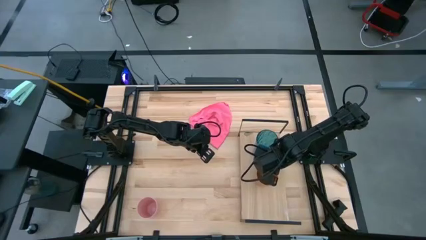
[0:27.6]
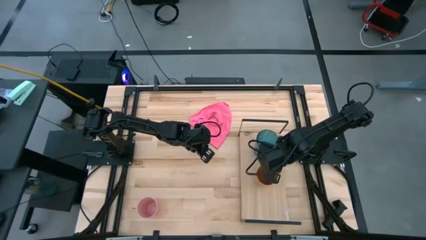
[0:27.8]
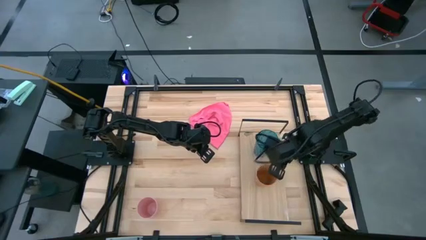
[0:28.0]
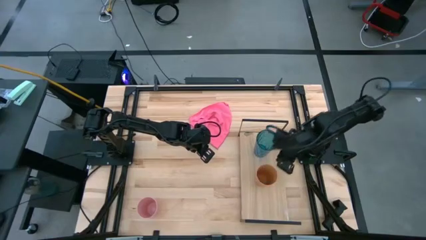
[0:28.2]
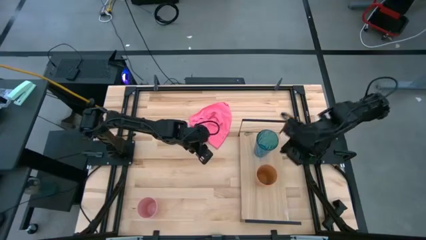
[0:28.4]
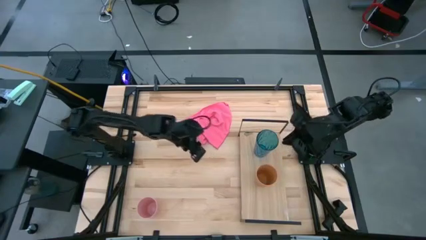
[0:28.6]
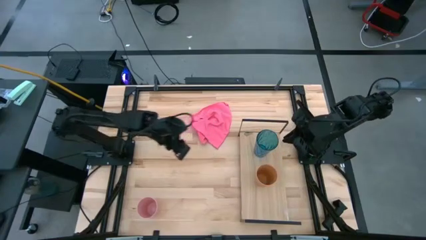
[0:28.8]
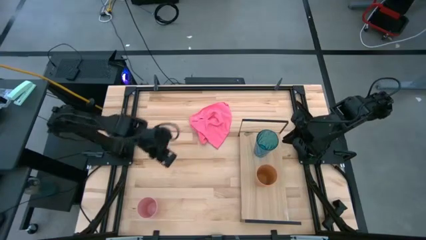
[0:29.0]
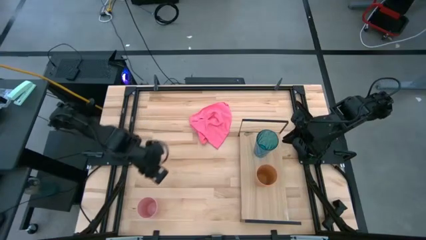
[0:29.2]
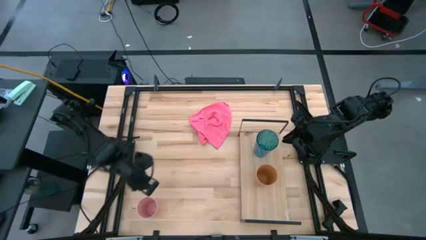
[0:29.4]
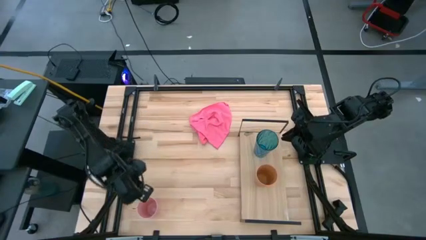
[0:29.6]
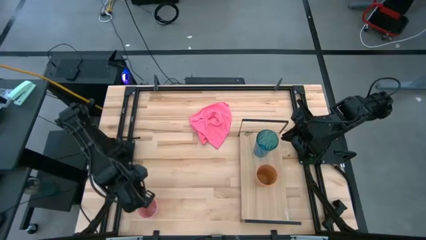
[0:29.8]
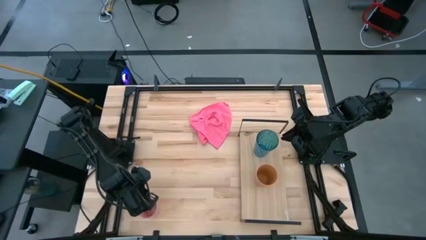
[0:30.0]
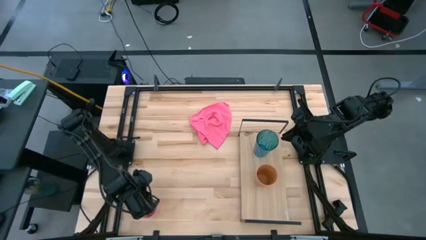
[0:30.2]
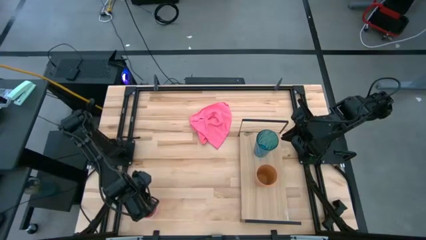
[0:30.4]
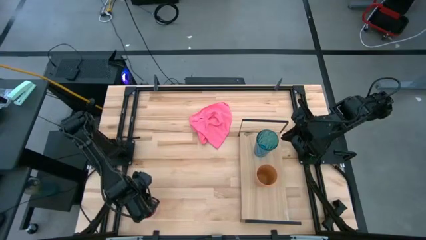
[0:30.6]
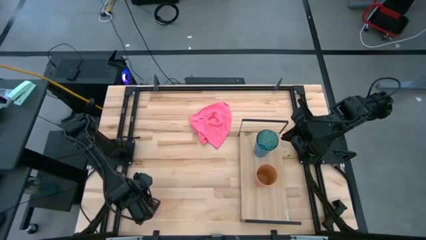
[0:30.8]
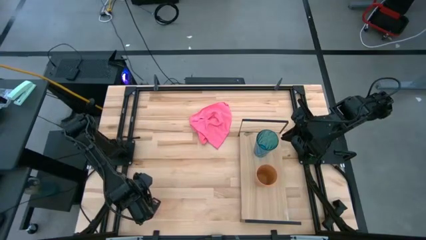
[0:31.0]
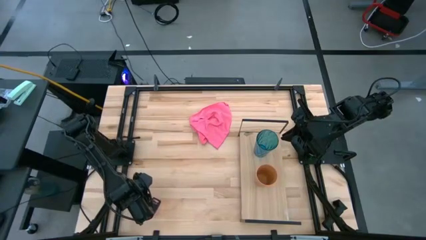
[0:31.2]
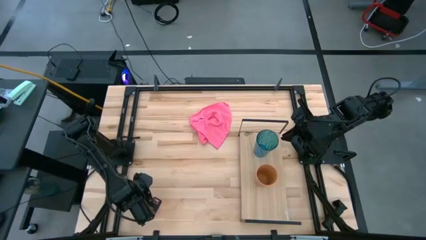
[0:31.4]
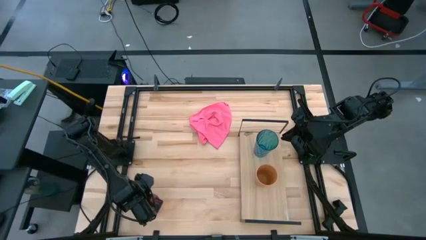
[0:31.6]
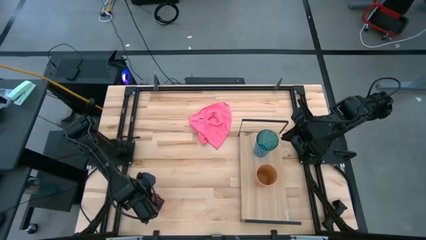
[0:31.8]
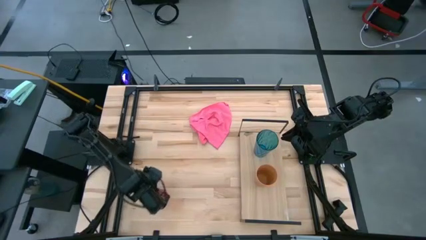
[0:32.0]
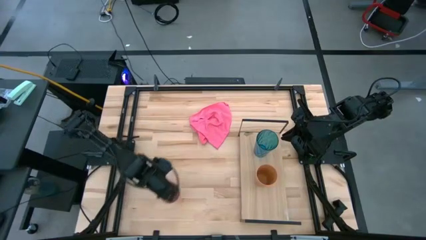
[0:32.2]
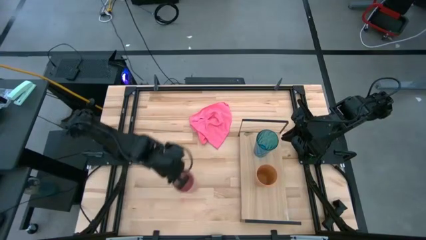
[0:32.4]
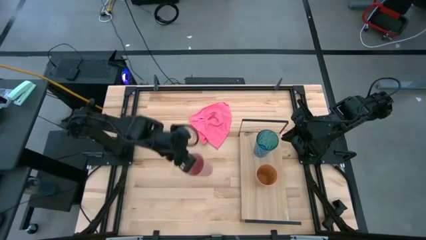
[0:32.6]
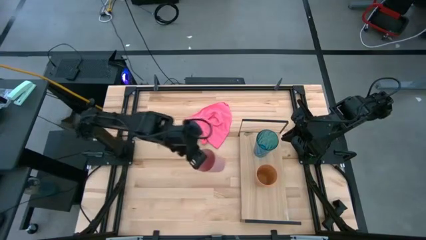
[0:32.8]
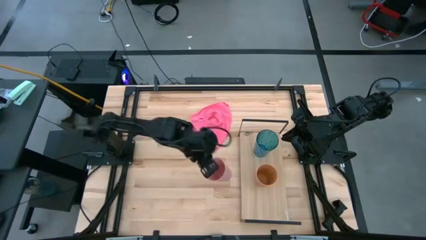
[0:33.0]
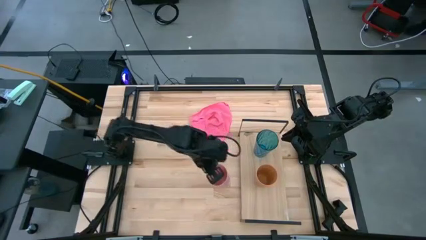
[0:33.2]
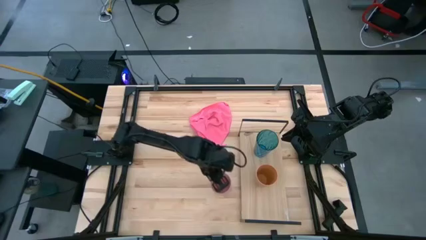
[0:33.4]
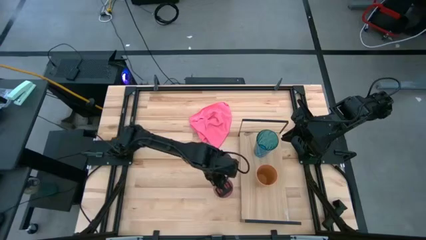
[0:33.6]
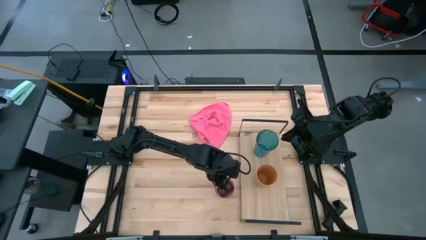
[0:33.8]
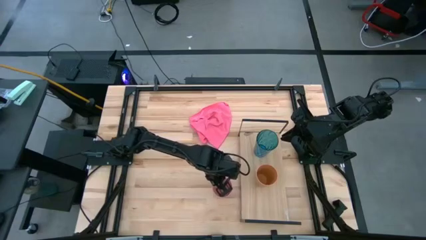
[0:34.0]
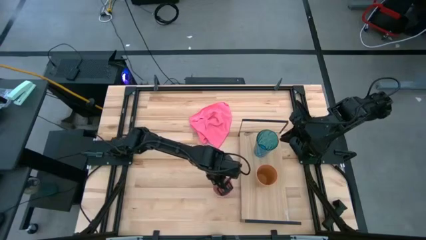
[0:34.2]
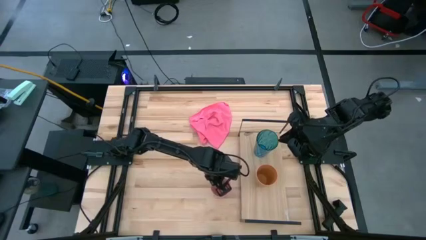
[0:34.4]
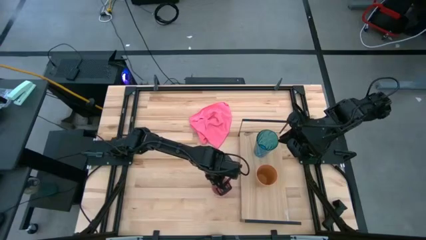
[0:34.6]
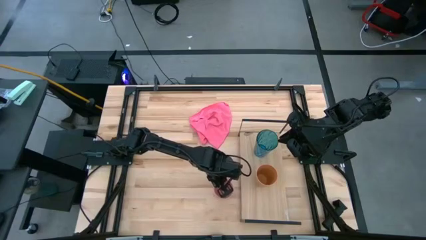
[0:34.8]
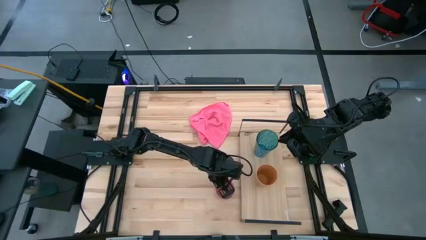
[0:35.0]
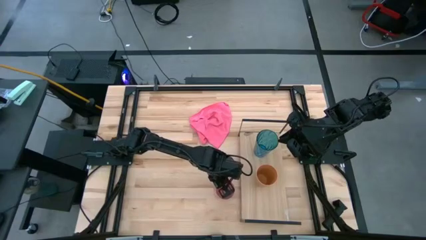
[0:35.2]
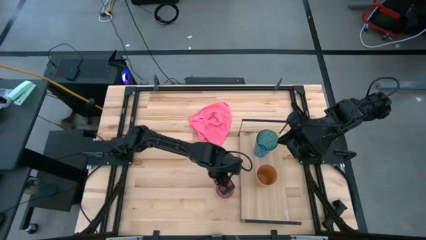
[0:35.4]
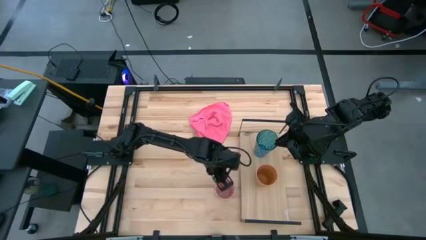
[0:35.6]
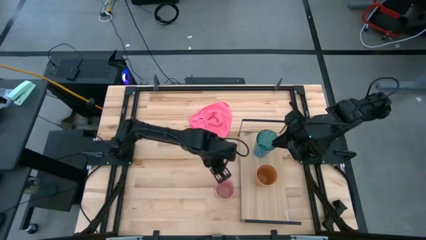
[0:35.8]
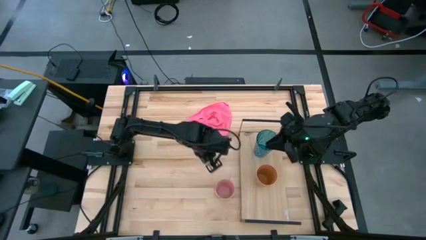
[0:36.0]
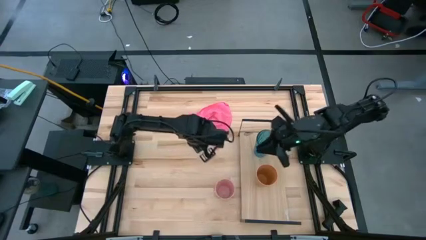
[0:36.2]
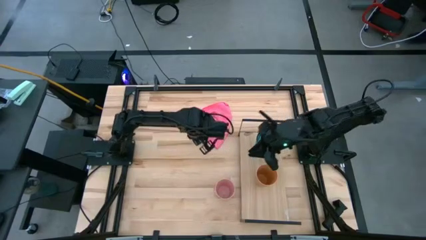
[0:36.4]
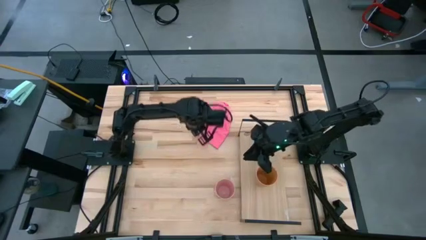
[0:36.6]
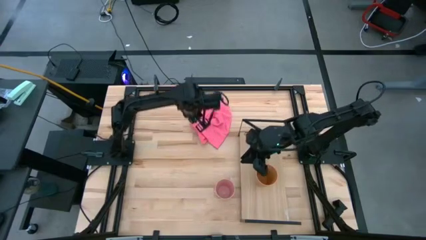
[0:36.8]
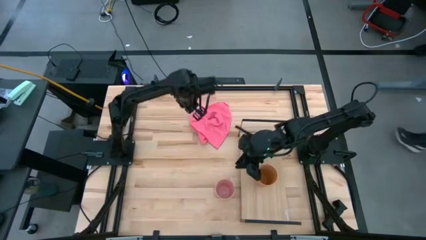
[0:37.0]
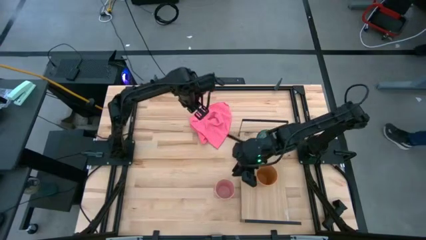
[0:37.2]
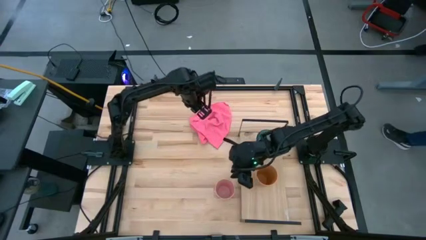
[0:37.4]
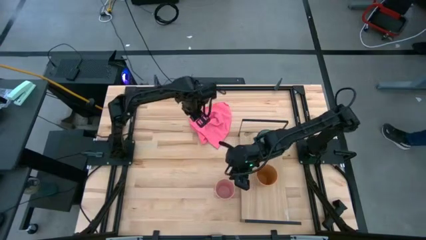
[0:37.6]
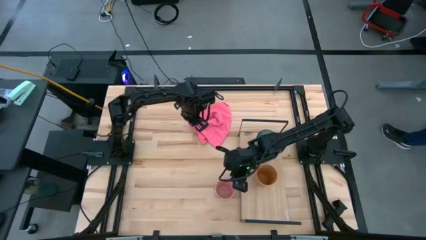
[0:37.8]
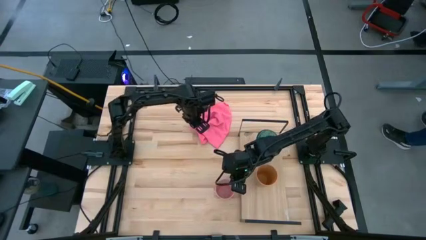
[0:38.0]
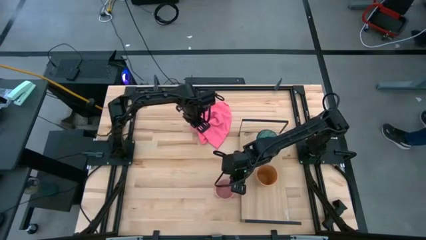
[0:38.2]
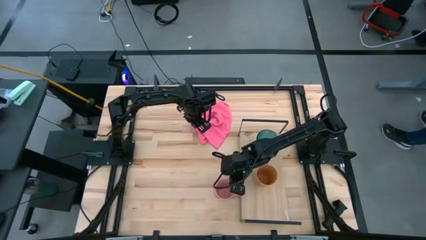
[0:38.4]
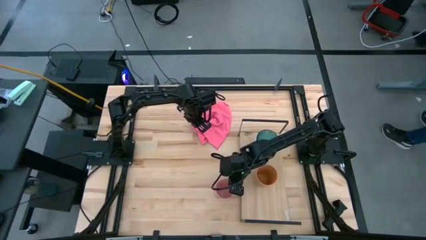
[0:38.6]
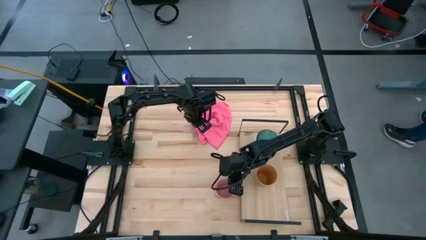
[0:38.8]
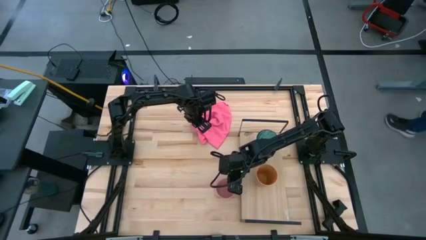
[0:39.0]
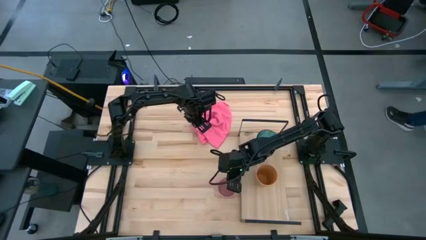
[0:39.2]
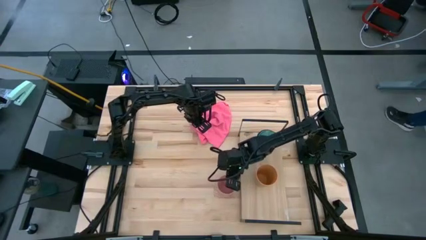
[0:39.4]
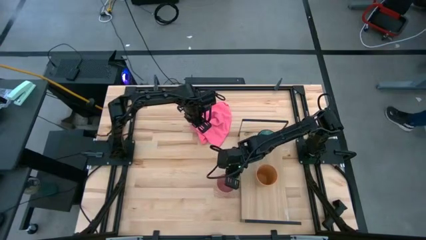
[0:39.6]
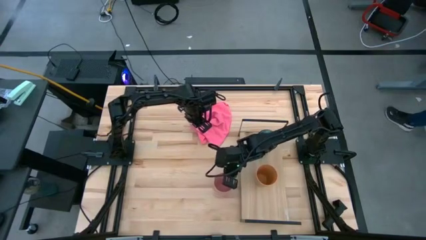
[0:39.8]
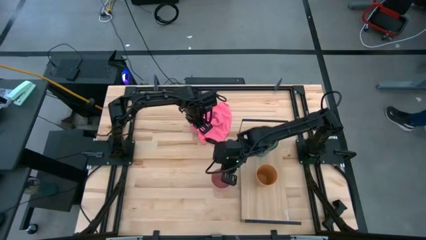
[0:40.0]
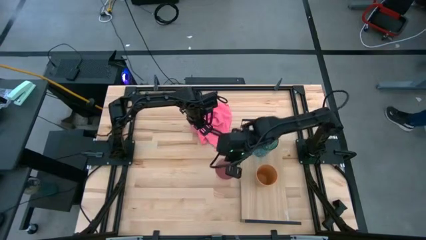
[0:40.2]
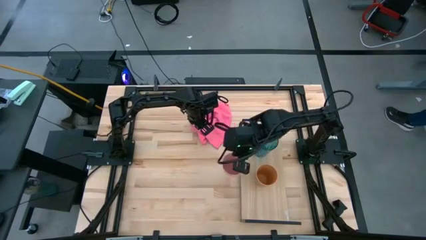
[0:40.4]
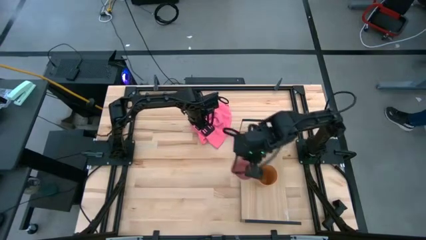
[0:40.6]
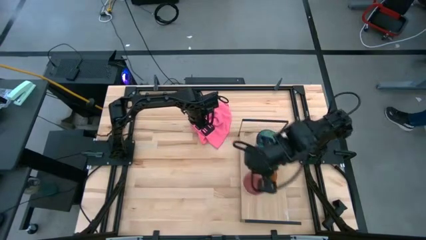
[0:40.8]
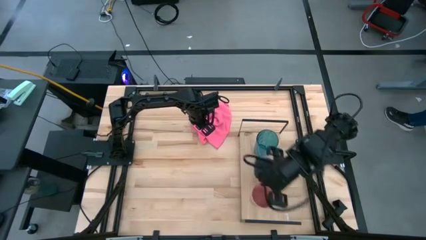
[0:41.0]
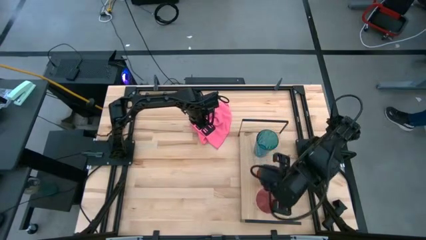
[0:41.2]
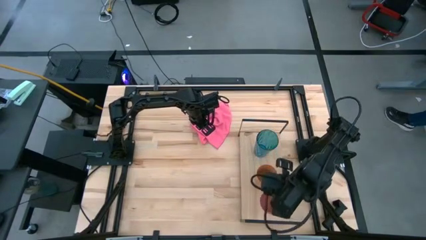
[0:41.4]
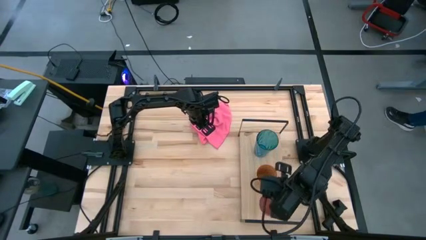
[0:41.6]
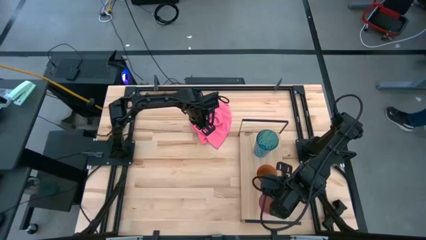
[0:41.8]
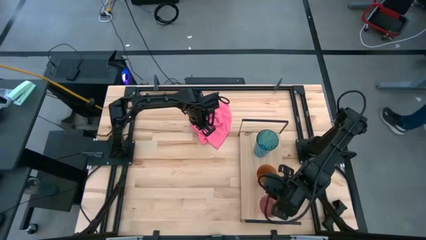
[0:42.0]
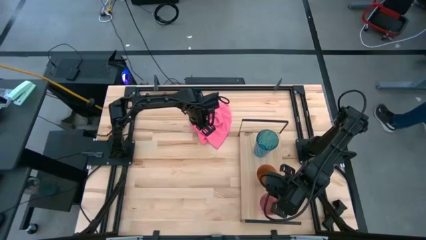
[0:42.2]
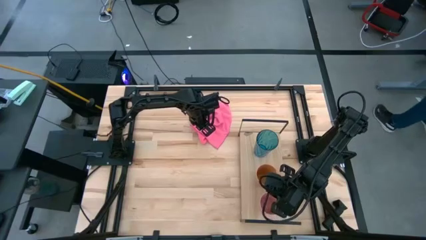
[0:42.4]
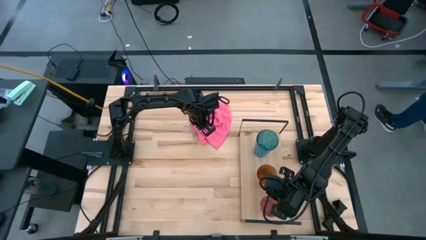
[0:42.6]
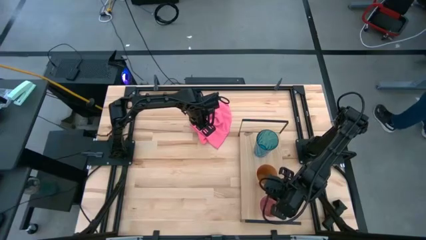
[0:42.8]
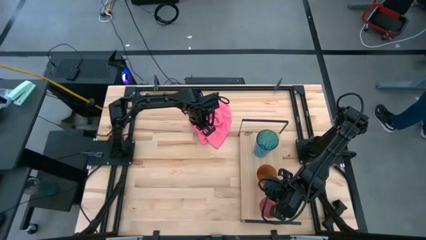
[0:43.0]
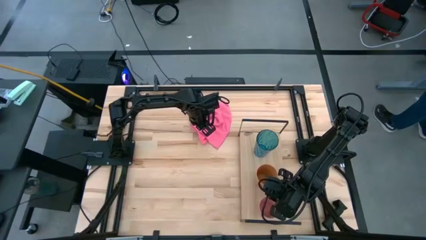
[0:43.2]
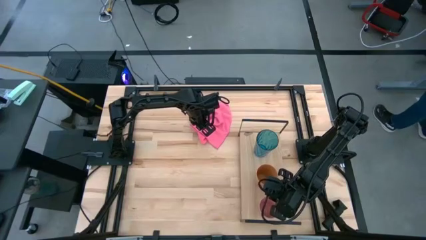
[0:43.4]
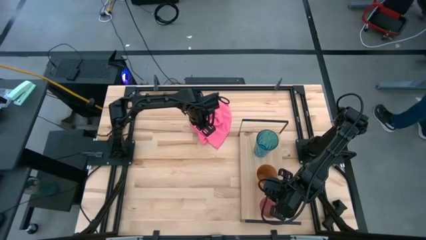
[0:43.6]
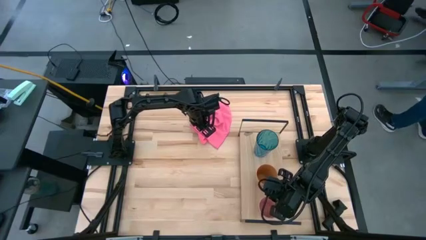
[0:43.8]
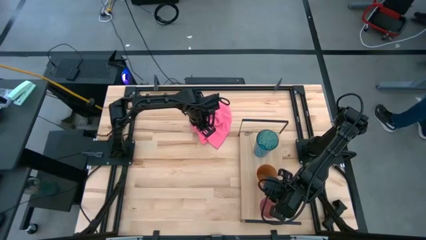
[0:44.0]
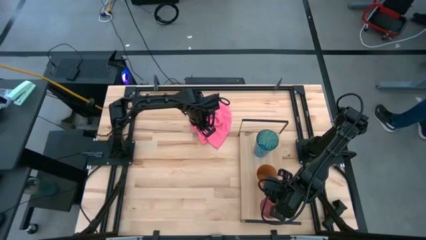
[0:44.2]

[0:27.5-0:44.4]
Task: Stack small to large cups/mugs on shelf
Put the pink cup on the shelf
